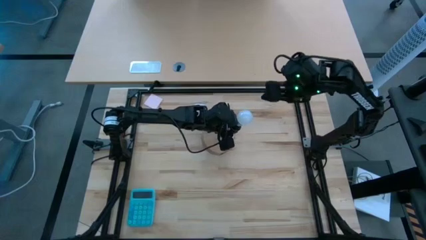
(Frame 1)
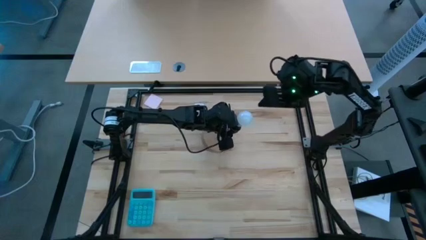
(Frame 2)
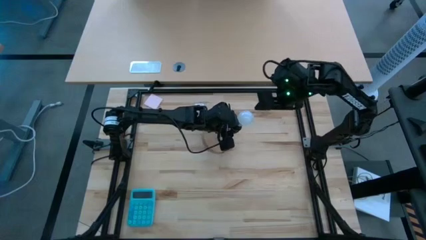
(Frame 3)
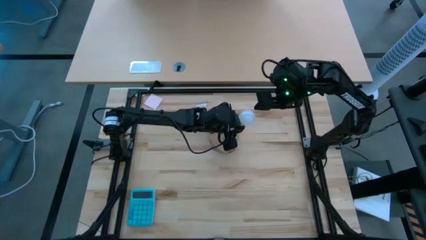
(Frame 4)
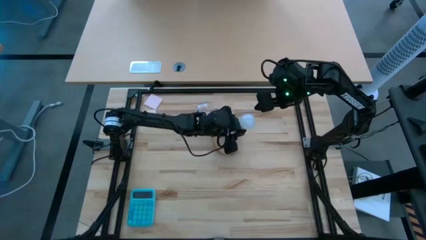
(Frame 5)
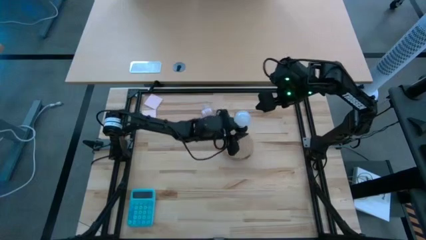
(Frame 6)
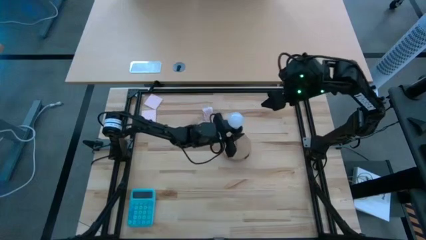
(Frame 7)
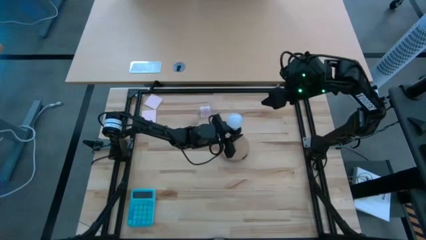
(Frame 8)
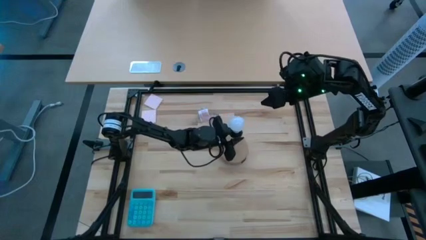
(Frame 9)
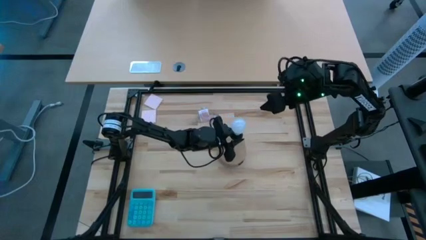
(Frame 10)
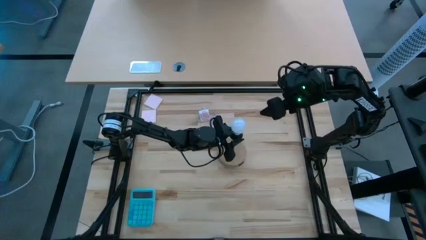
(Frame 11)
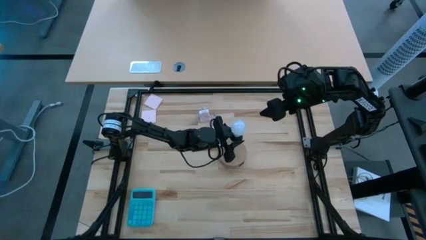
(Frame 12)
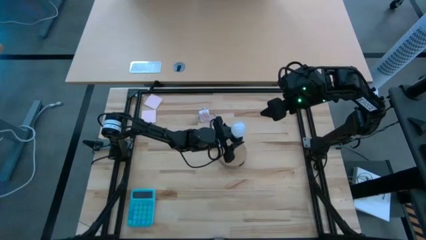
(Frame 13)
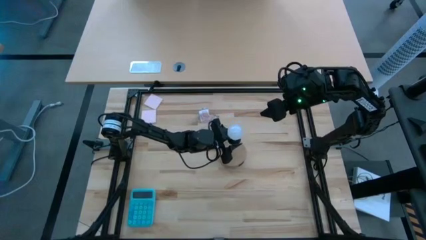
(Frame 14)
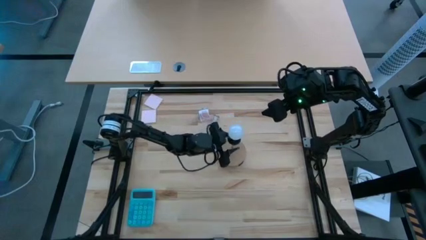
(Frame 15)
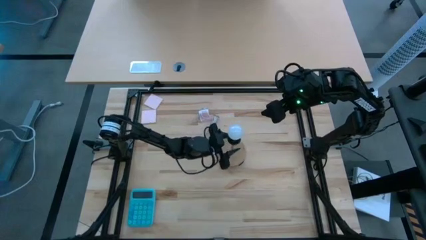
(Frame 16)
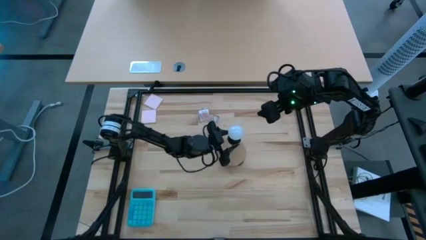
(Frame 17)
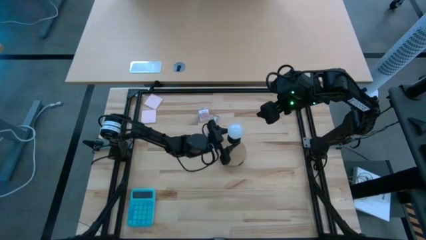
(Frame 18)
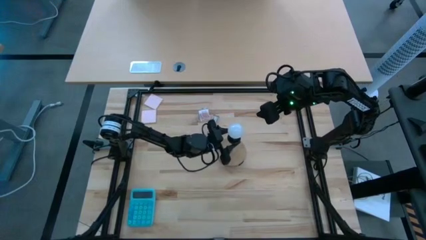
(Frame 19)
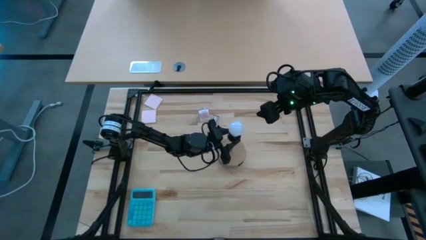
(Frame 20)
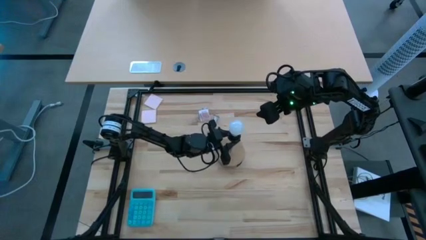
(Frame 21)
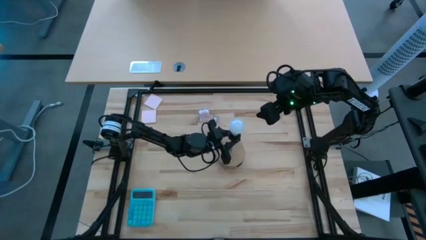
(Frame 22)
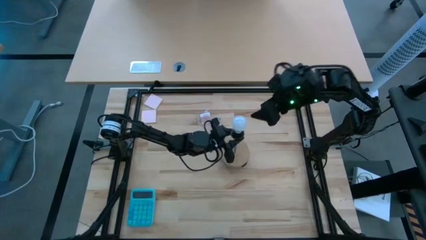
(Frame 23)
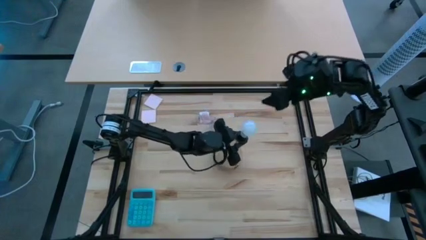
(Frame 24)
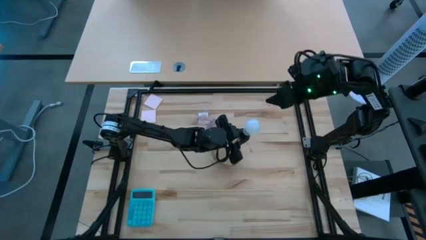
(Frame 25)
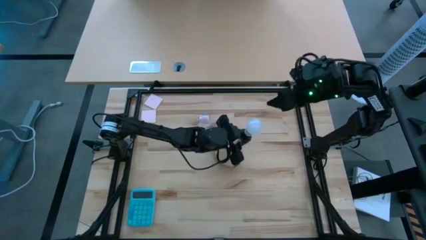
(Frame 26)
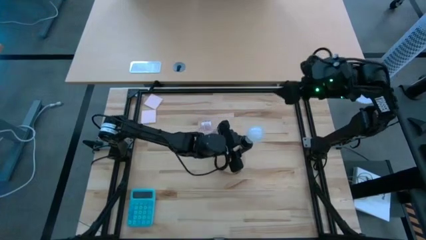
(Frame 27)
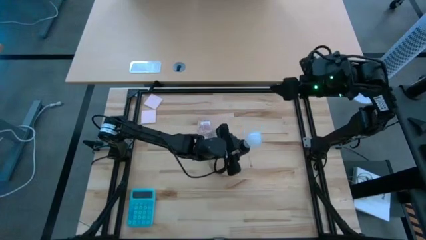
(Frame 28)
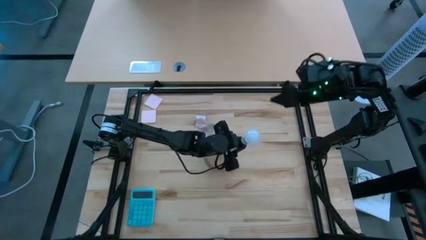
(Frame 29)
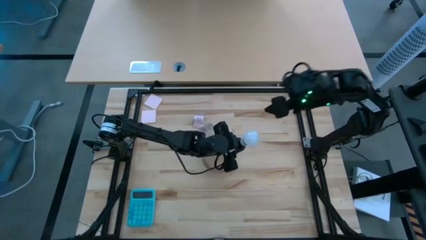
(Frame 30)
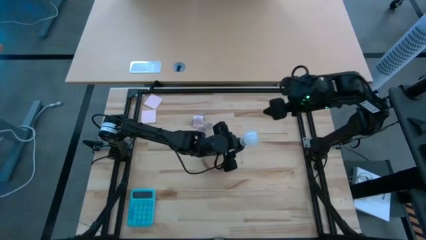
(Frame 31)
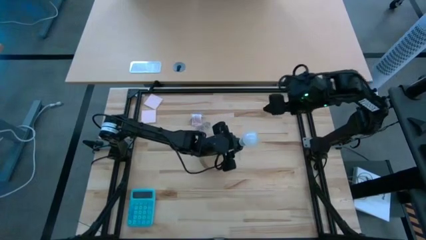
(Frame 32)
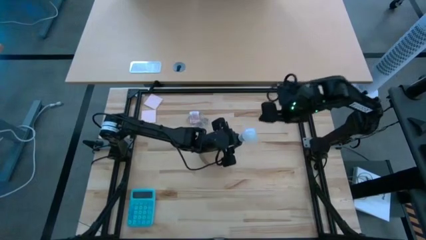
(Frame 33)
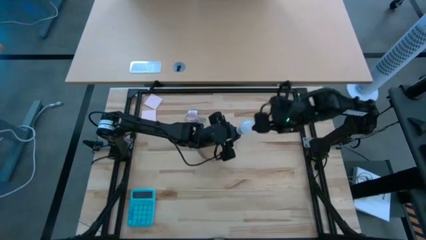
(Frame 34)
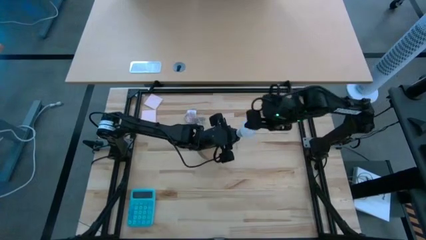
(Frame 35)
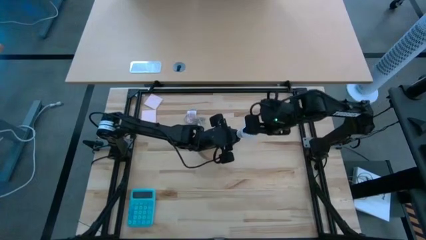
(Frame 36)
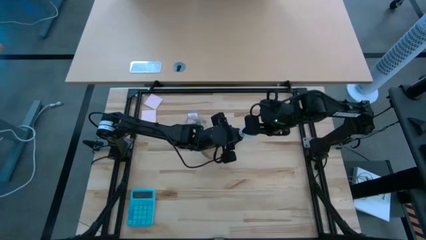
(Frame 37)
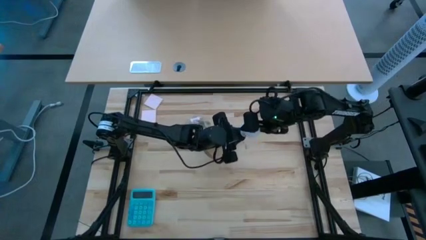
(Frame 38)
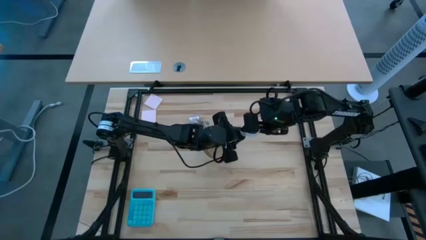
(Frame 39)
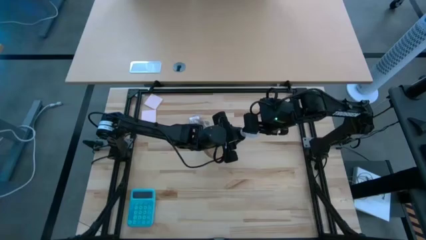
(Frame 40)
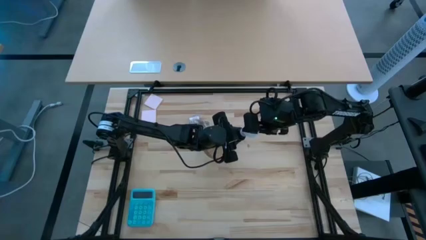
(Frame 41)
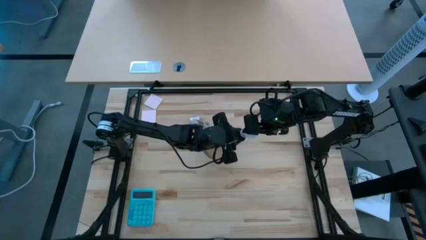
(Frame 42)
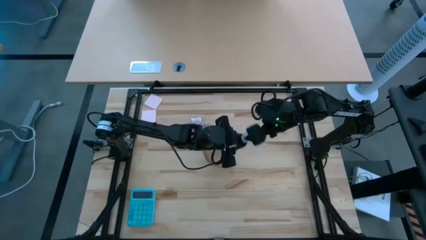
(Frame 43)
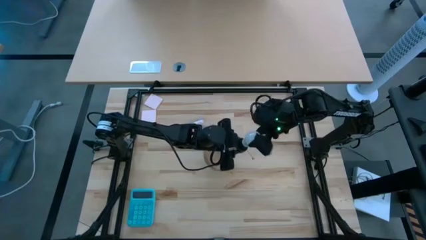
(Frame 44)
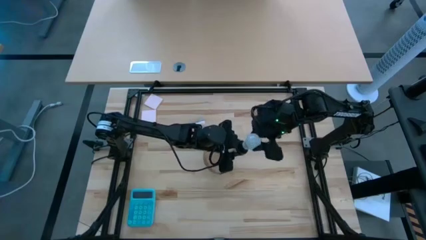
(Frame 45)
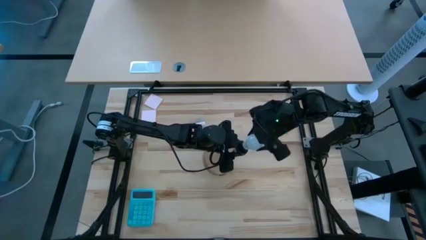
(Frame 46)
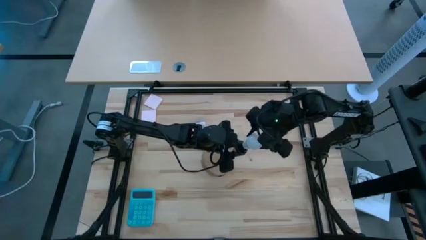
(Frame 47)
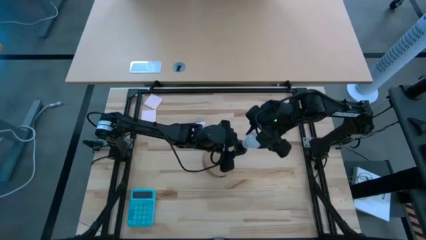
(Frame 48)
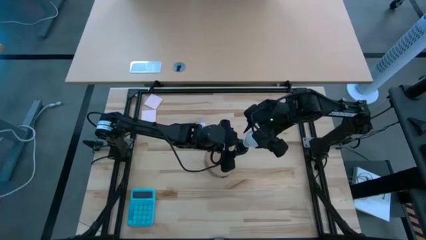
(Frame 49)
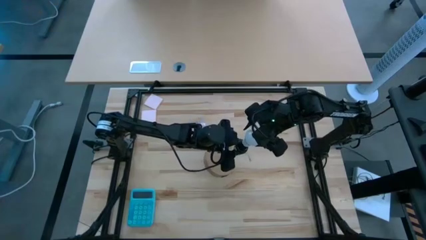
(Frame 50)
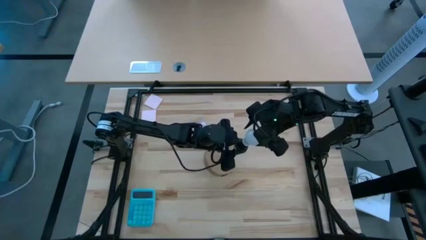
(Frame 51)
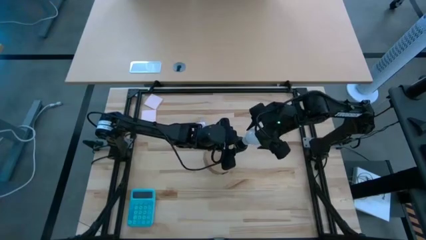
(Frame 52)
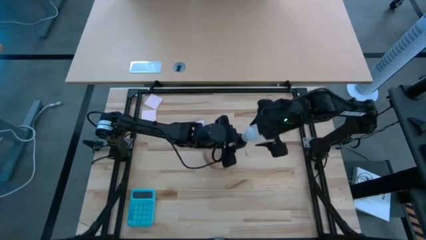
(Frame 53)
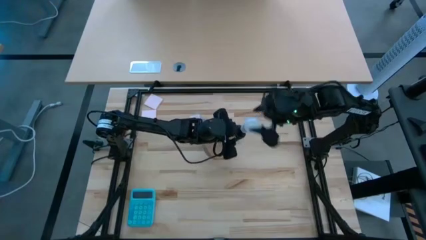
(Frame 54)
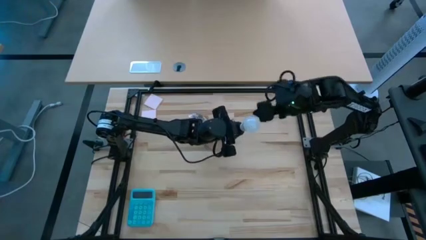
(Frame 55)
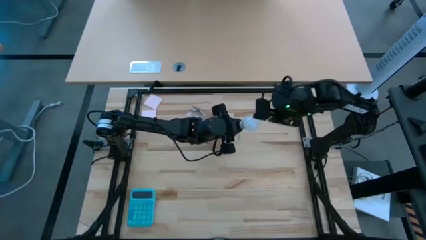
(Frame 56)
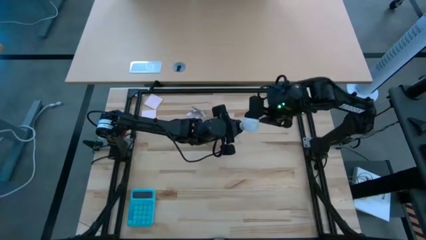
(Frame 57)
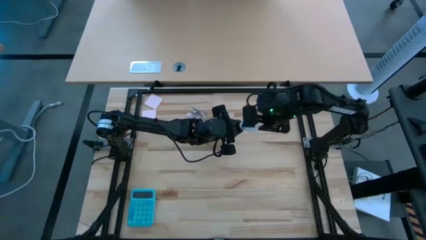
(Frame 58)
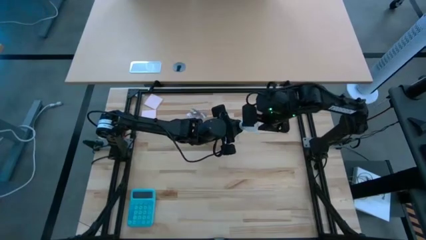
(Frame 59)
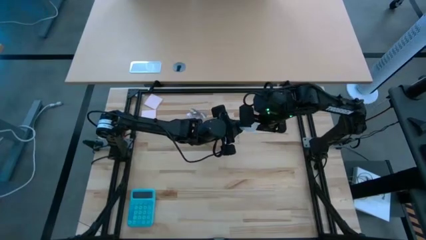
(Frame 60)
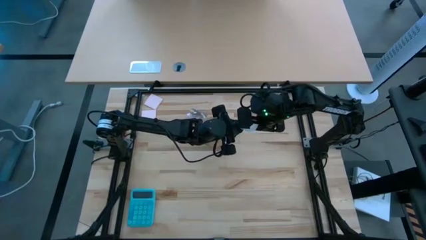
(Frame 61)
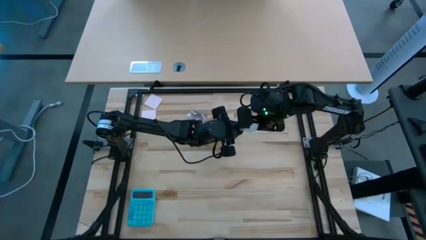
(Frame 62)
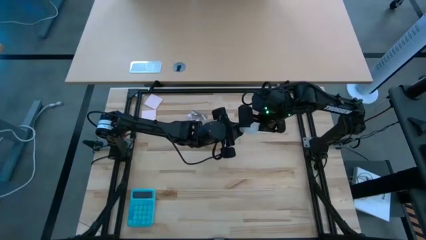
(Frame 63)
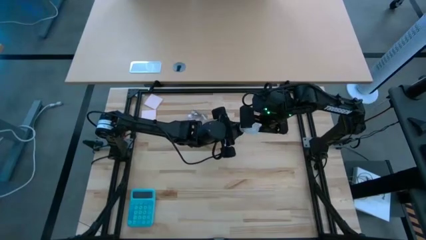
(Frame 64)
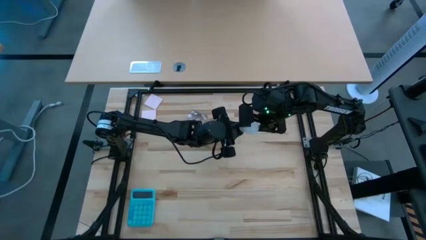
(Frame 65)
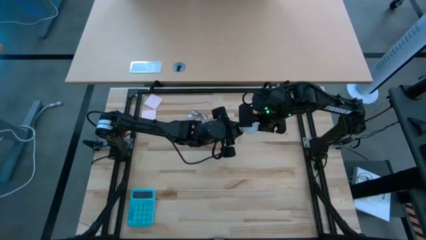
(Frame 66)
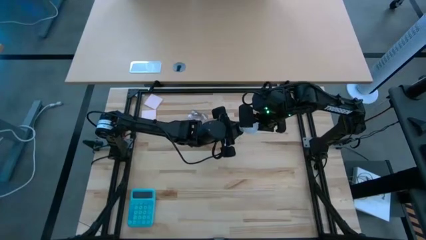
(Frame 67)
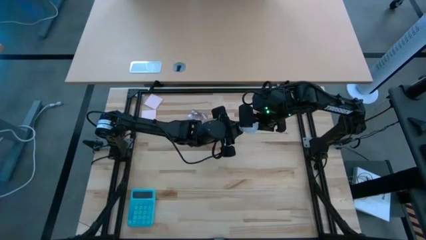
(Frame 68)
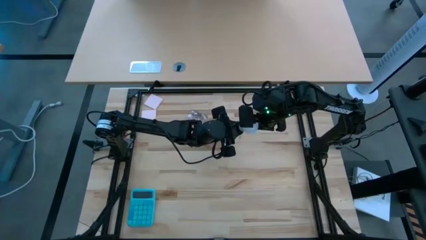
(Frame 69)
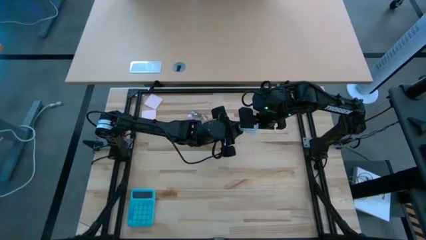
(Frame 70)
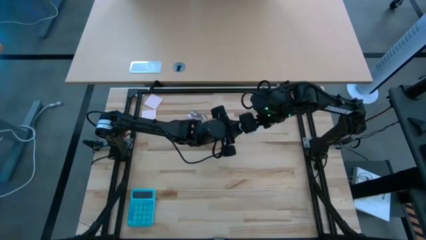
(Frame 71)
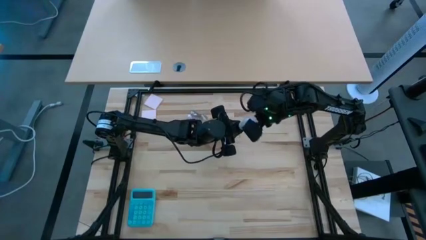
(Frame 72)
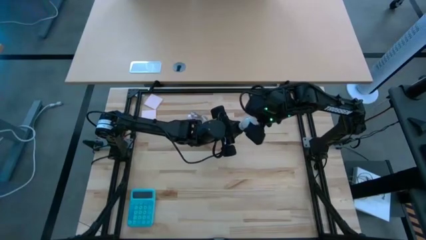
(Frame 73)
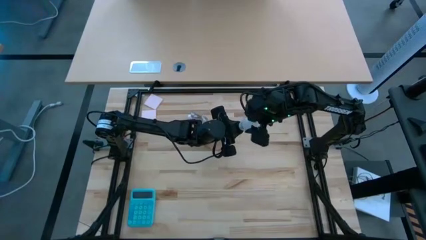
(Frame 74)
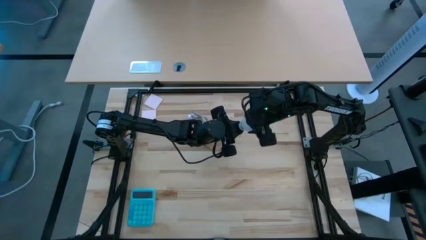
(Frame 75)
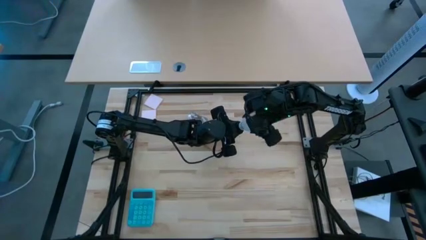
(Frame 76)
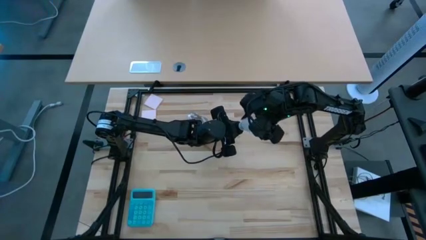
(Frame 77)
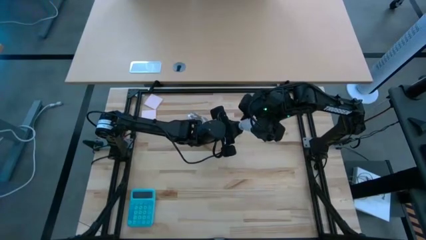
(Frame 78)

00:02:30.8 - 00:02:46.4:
Task: Screw lightbulb
Remove the light bulb from the lamp
